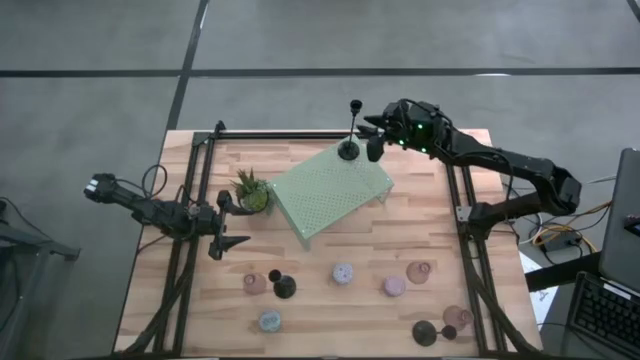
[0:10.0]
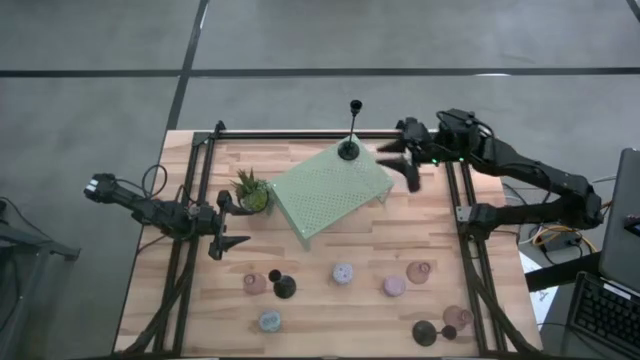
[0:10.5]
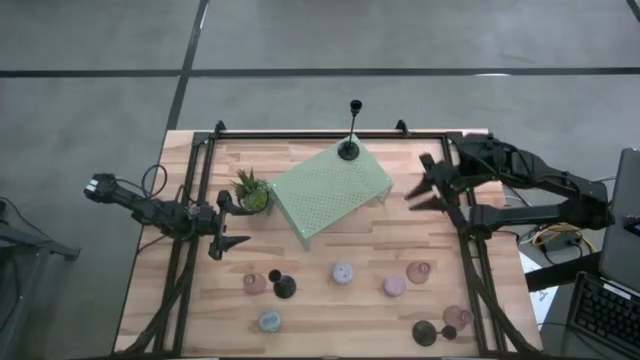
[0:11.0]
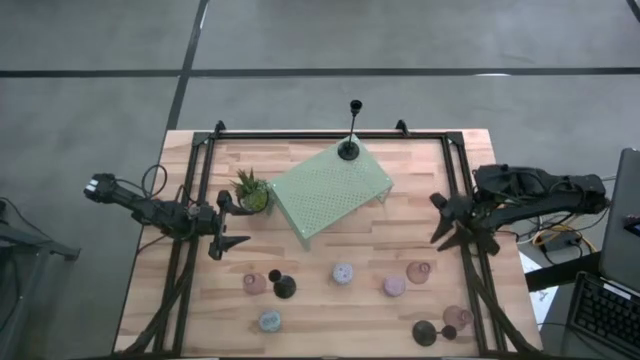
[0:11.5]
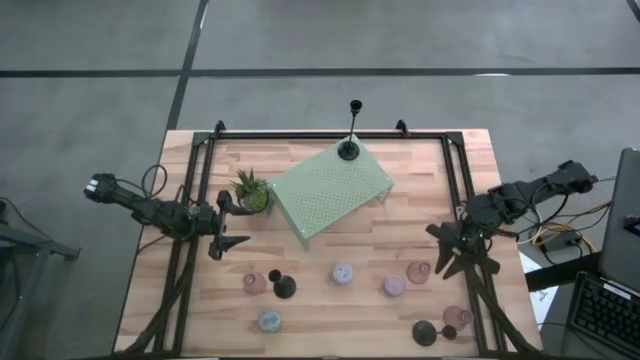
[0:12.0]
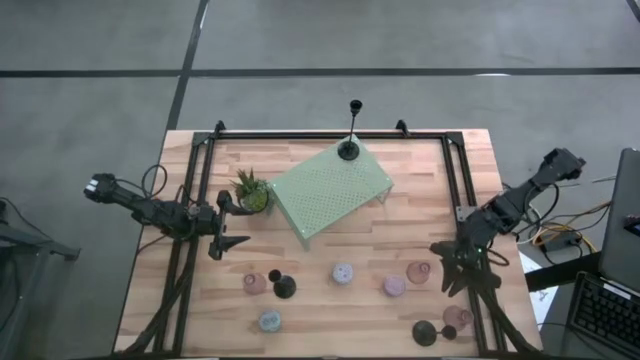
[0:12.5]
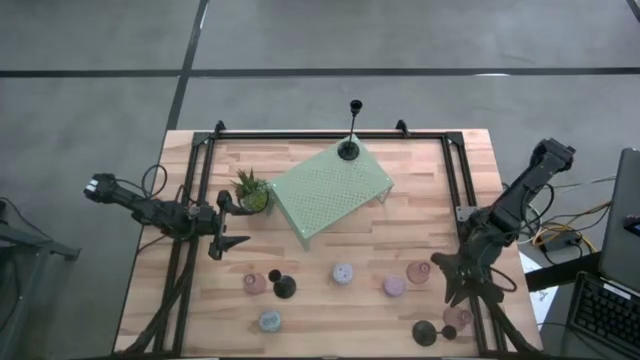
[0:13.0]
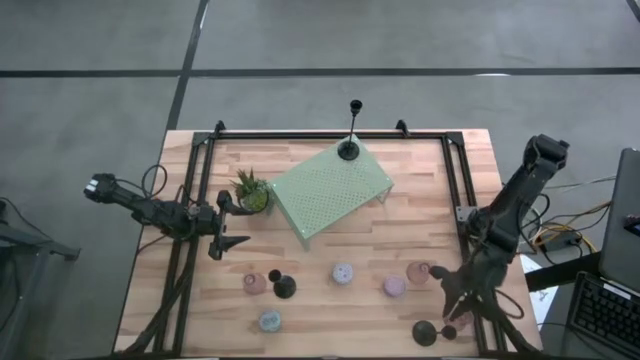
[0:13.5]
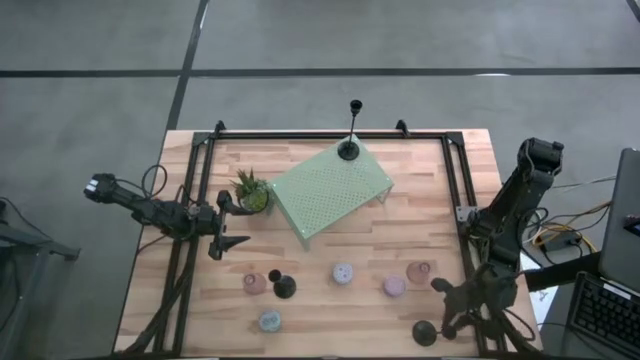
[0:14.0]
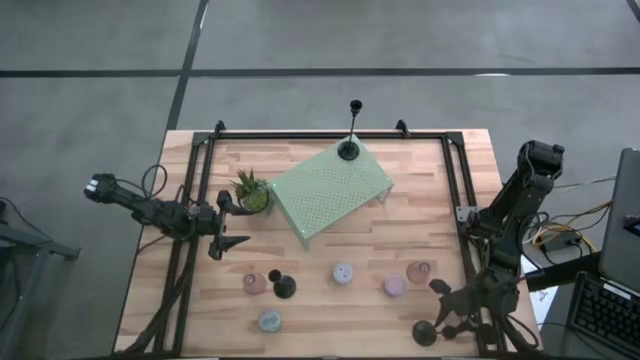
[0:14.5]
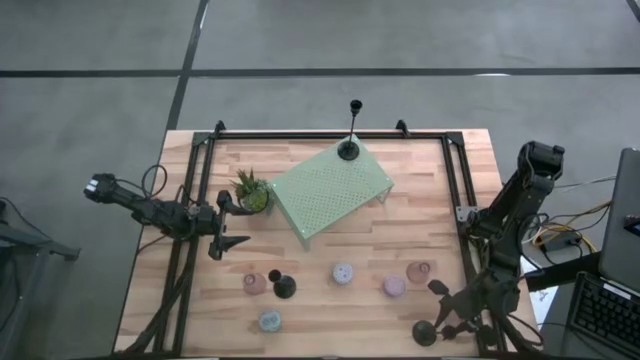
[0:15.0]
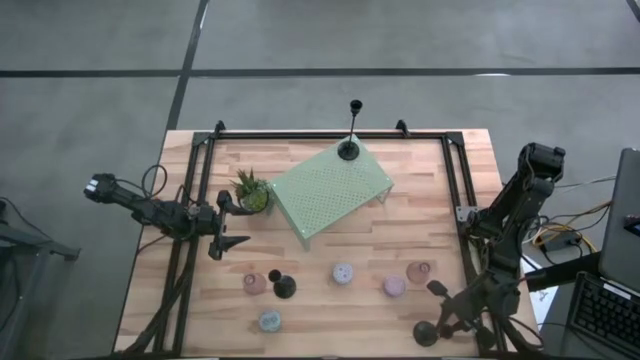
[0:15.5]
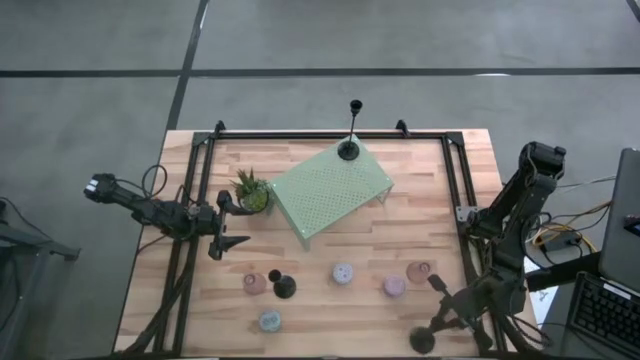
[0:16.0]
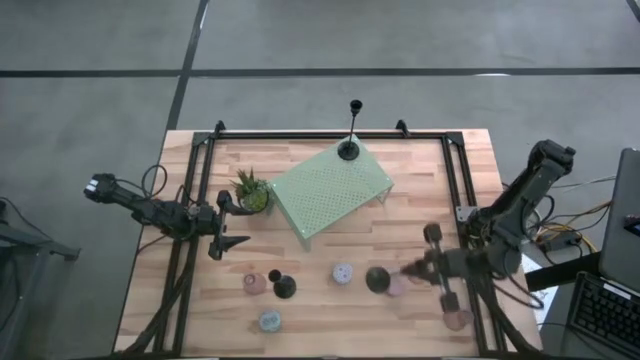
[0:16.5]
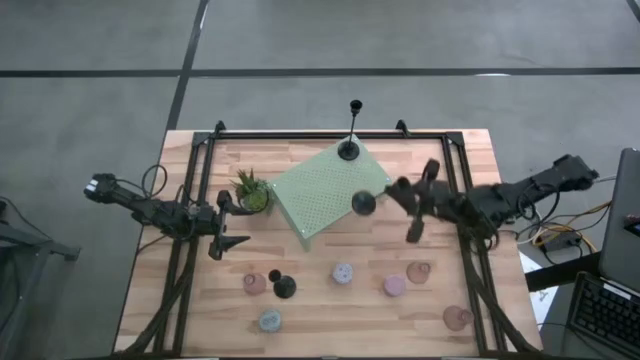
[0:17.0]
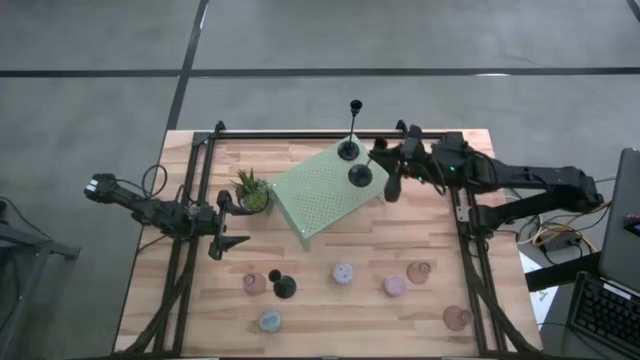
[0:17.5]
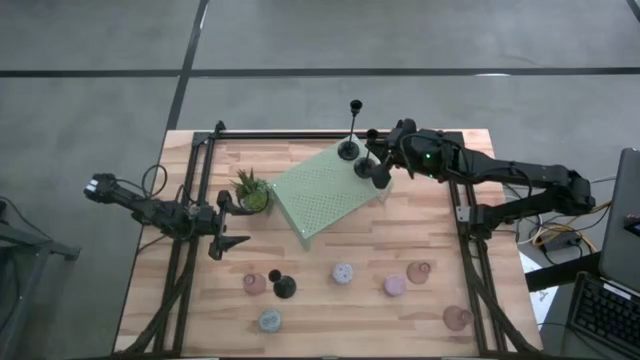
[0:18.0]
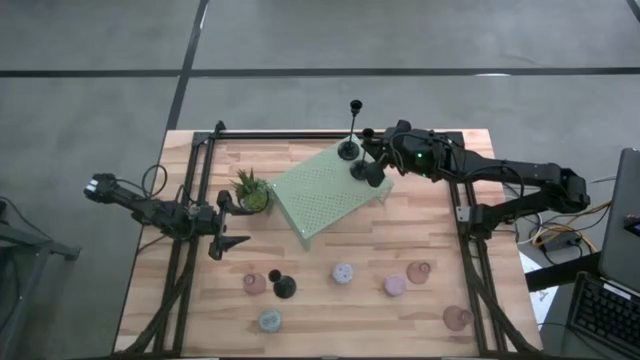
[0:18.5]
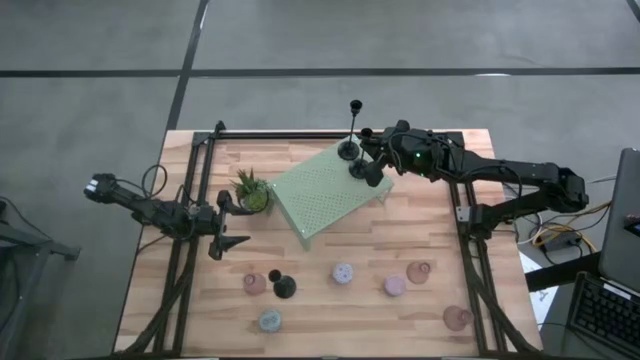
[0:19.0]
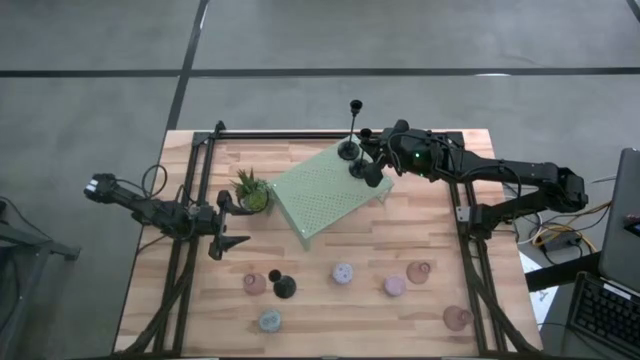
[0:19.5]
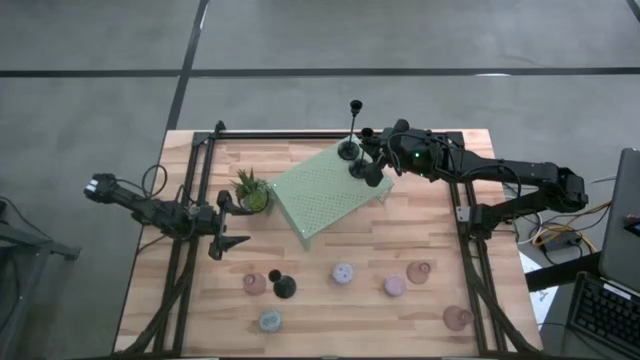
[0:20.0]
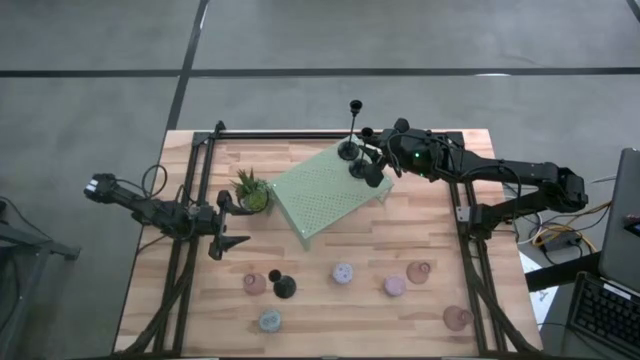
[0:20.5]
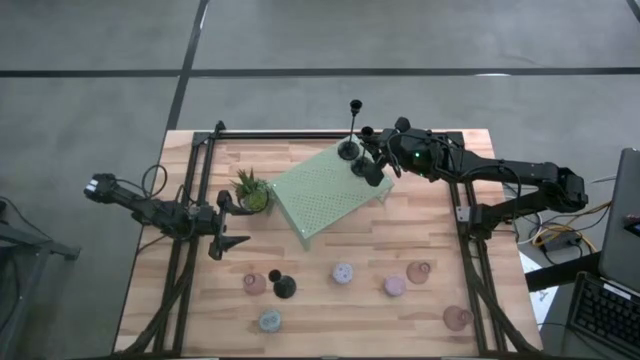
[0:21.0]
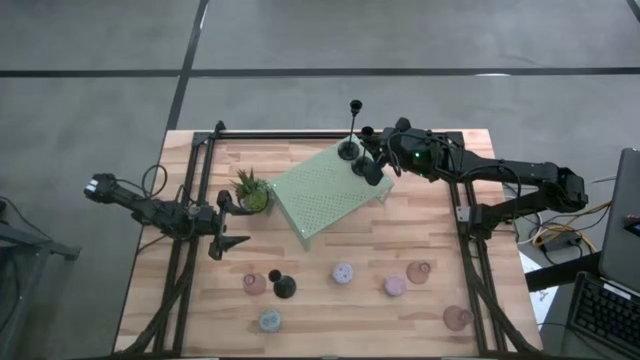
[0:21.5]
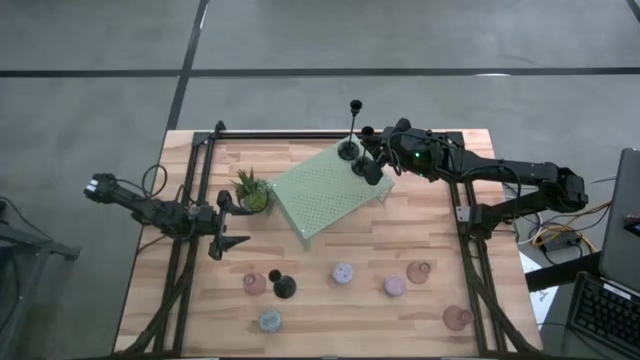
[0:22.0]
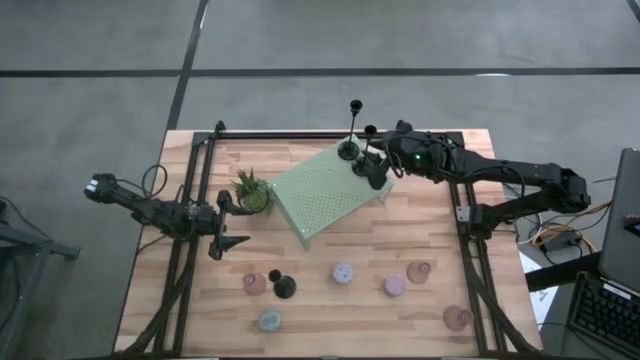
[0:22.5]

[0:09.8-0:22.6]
Task: Pick & Place candle stick holders
Put the bottom right black candle holder on the shelf aligned with the other black candle holder

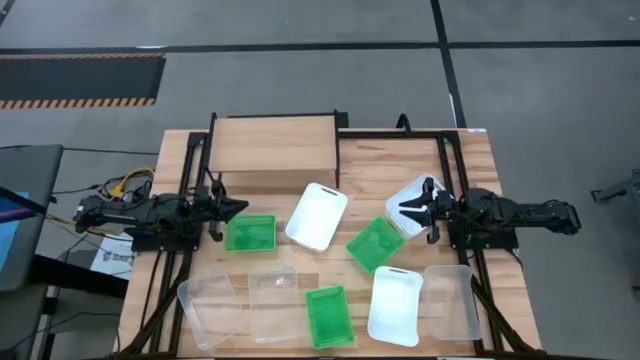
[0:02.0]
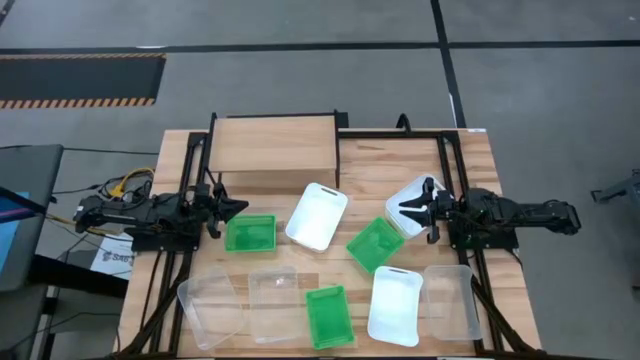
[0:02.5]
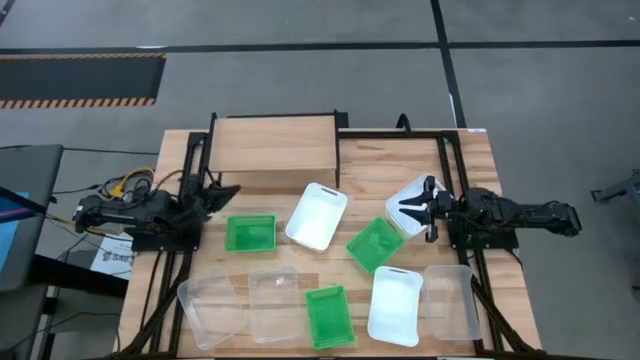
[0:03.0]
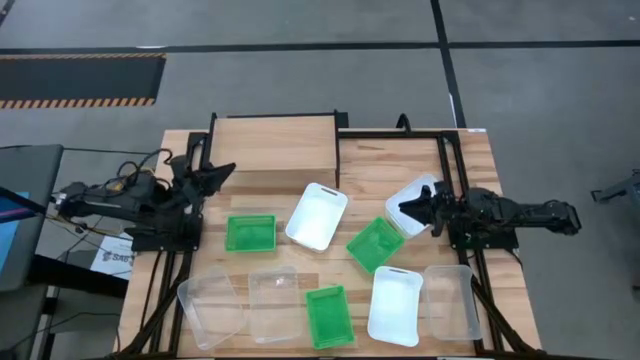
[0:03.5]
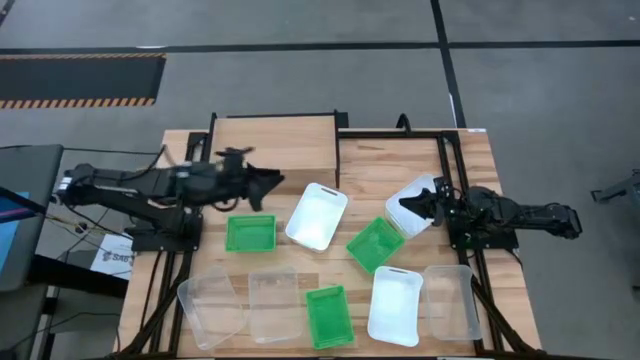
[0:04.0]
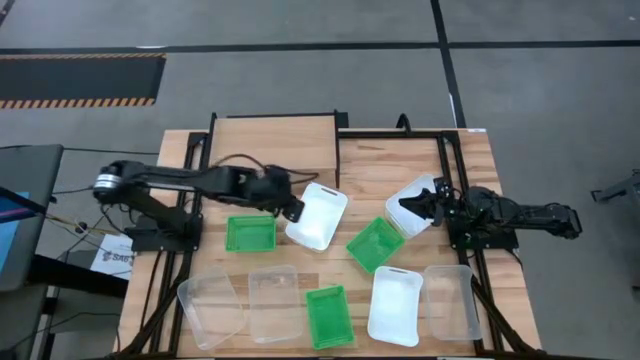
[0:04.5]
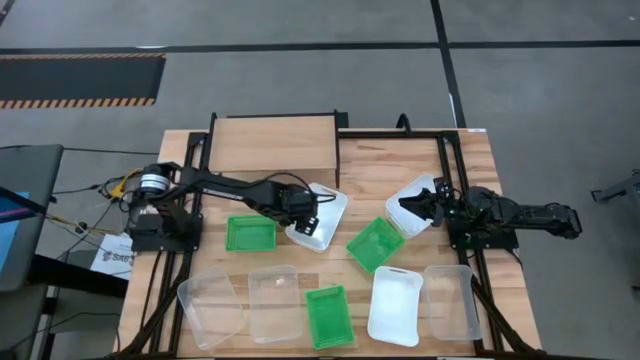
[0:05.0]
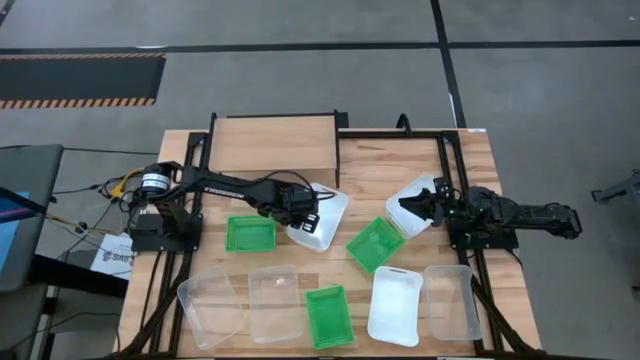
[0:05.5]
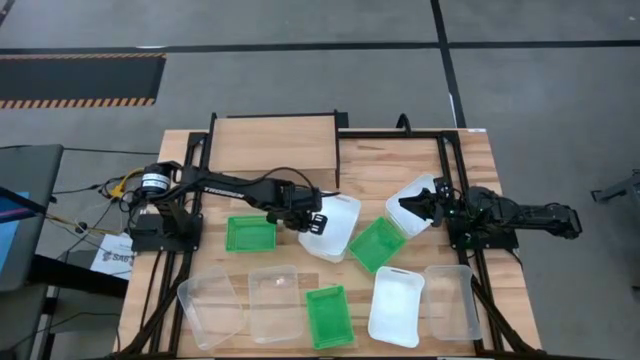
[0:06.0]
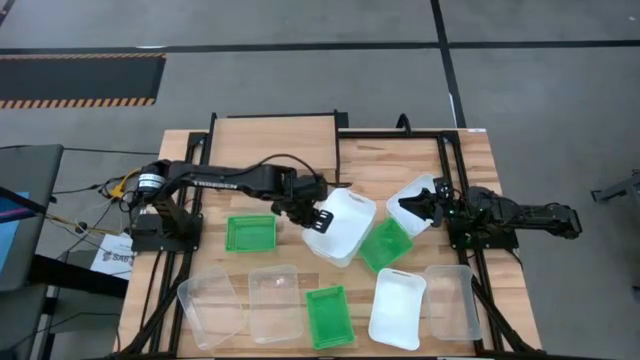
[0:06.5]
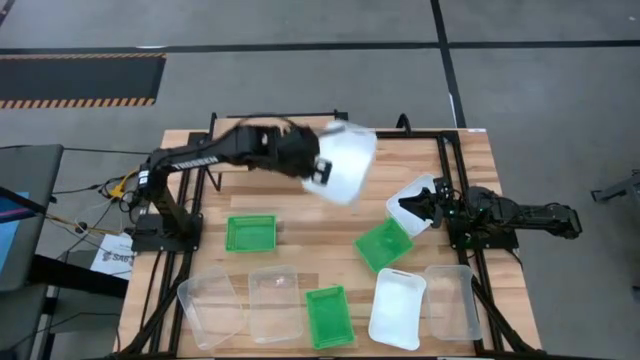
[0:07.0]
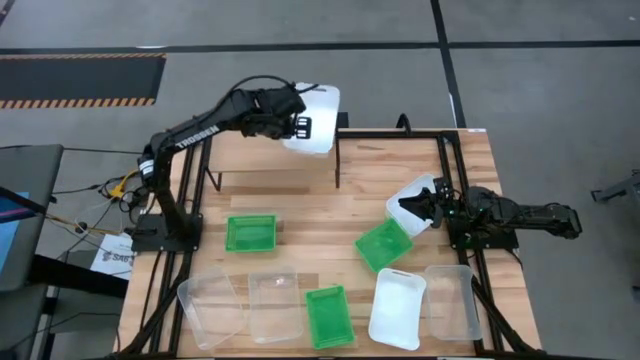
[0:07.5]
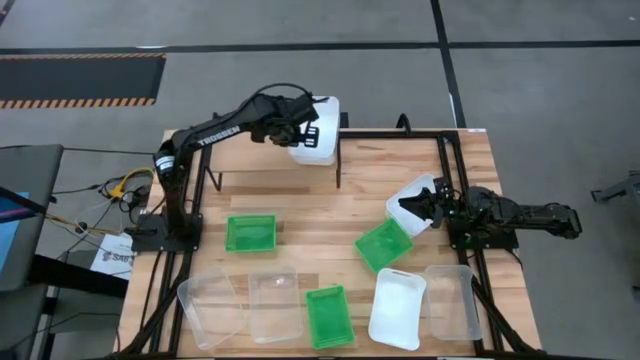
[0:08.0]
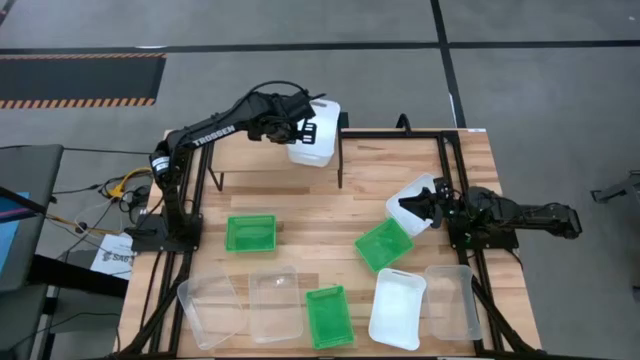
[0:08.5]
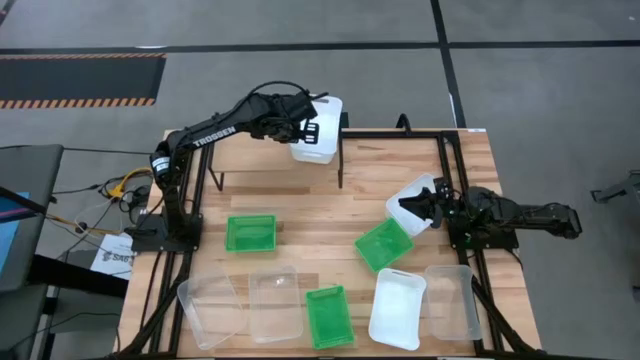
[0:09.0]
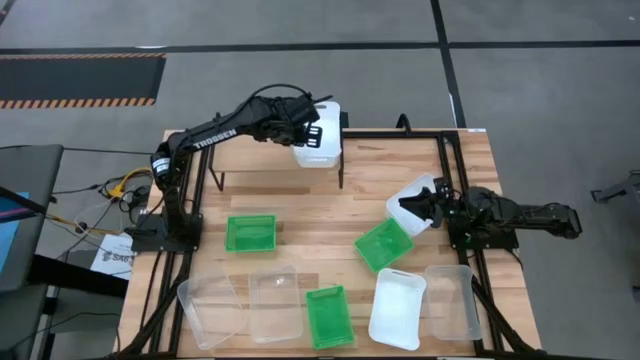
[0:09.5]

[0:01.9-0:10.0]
Task: Stack baskets on shelf by color
Put the top left white bin on the shelf
